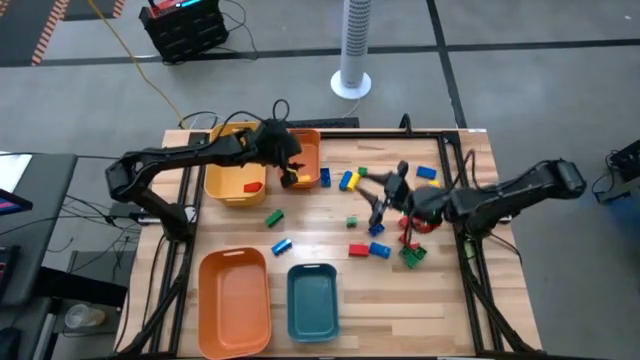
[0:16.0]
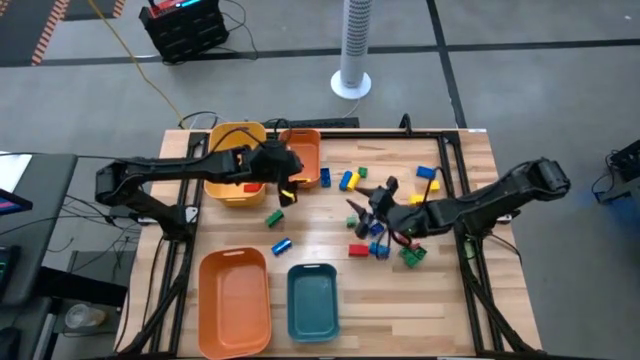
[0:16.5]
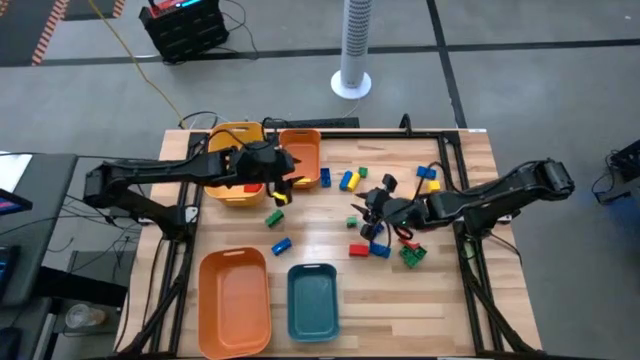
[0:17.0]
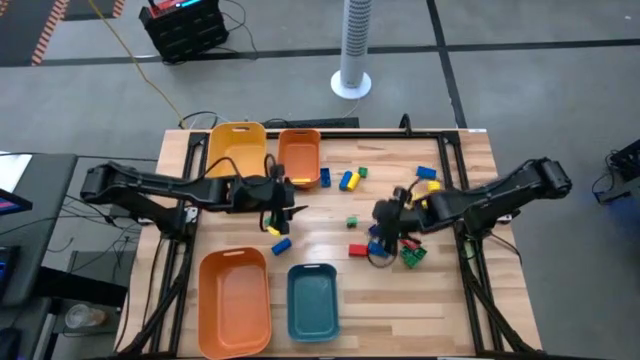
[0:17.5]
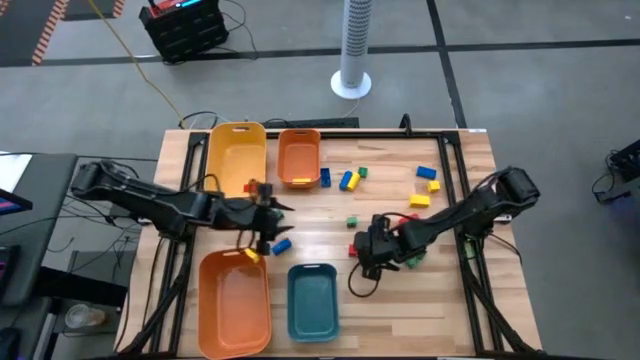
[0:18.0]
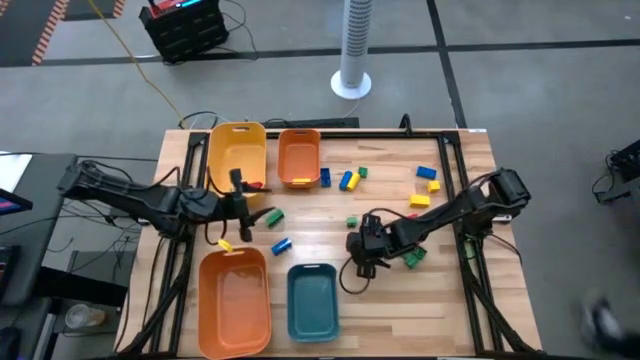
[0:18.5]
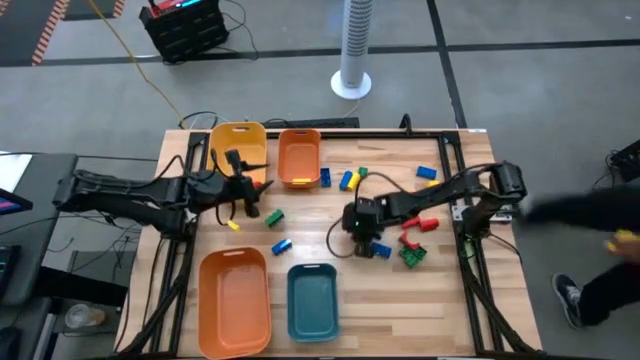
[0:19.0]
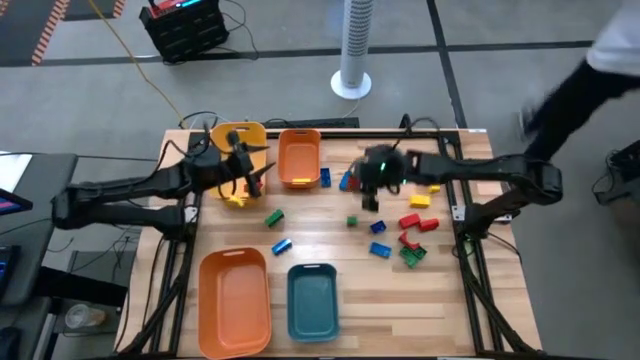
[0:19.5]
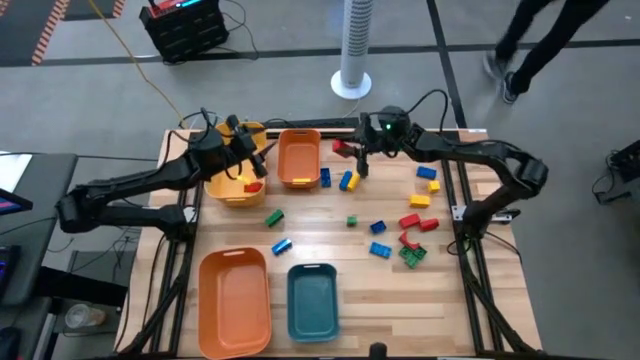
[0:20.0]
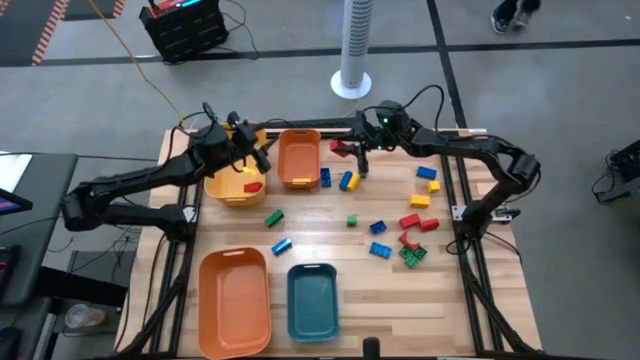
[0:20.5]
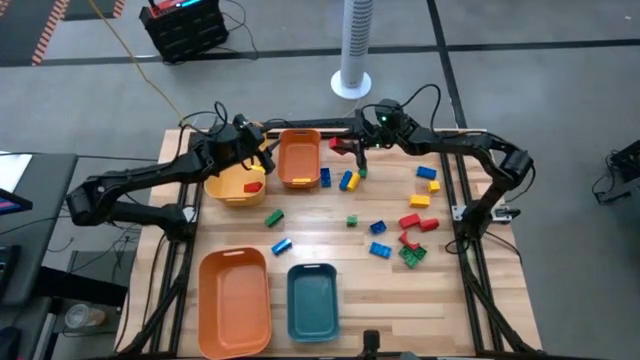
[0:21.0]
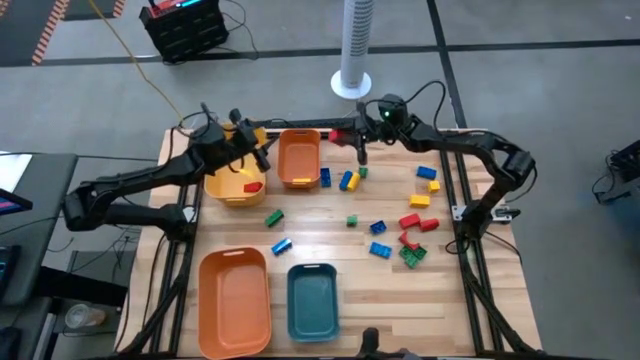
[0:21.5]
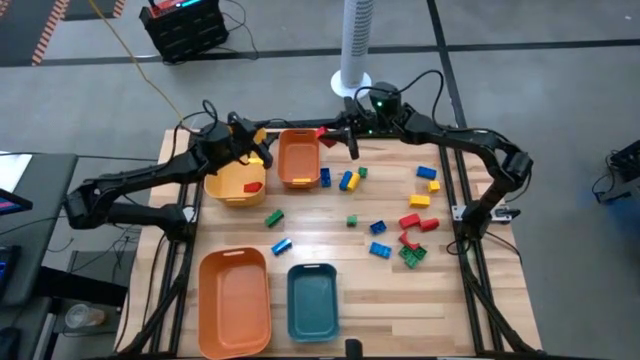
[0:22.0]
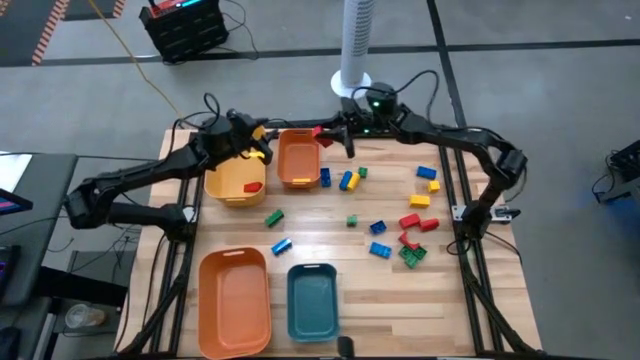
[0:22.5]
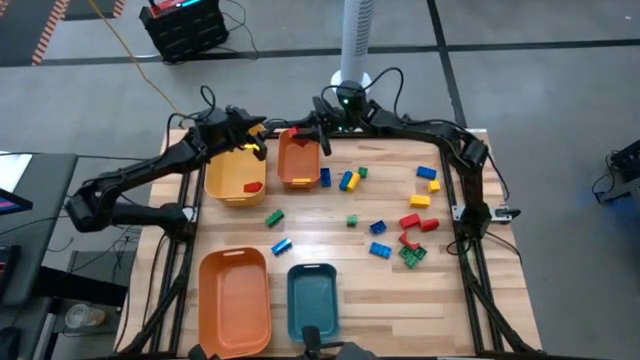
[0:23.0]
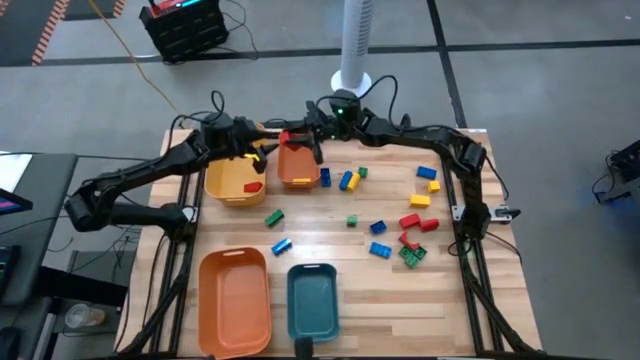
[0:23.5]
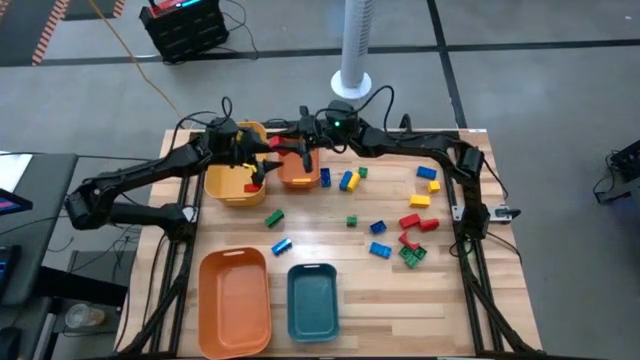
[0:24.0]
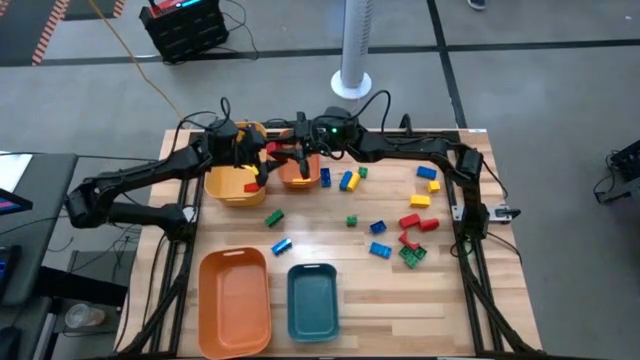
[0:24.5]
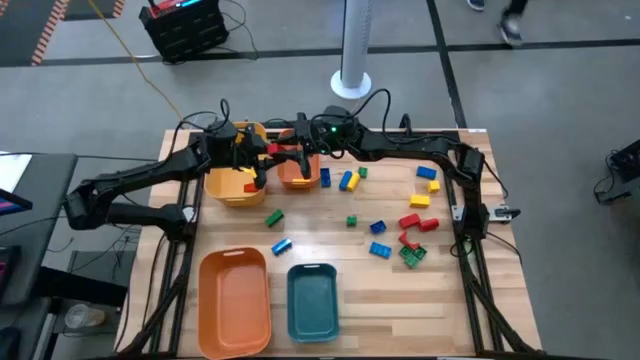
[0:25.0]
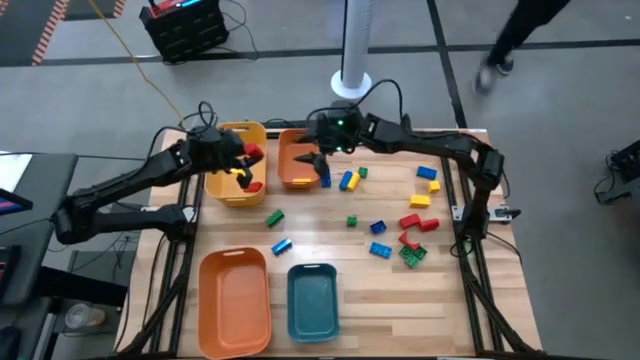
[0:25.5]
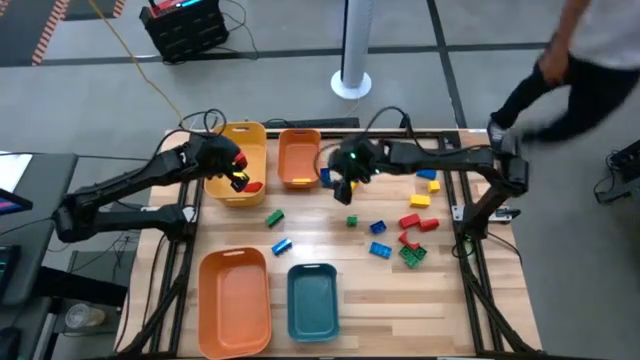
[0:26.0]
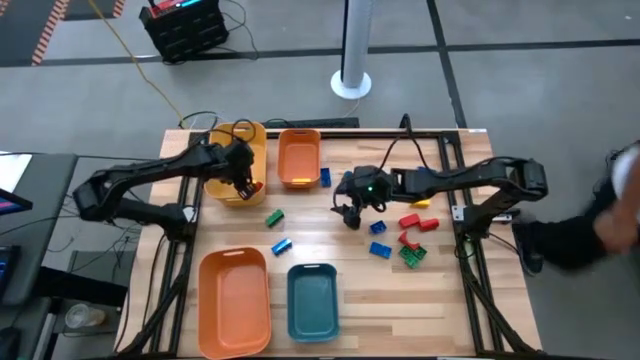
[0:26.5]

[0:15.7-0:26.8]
Task: Sort blocks
Put the red block into the yellow bin

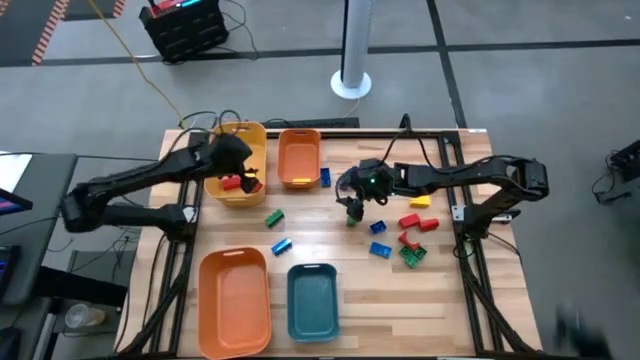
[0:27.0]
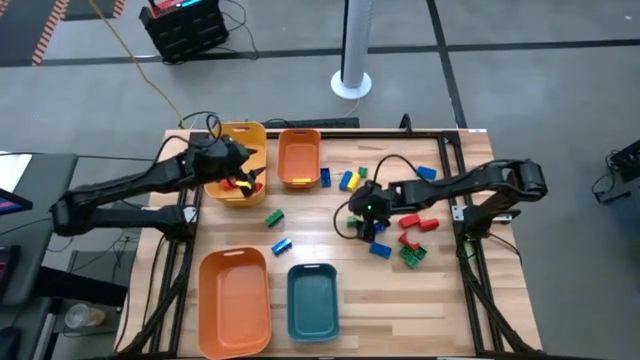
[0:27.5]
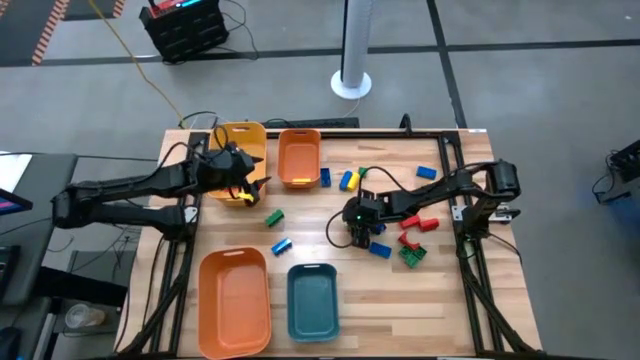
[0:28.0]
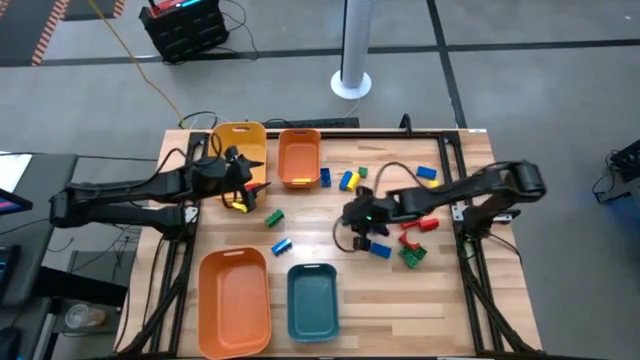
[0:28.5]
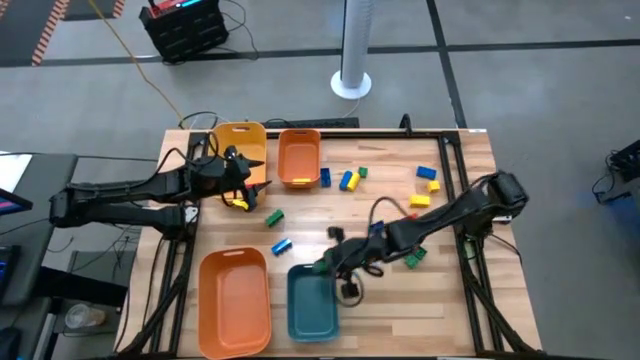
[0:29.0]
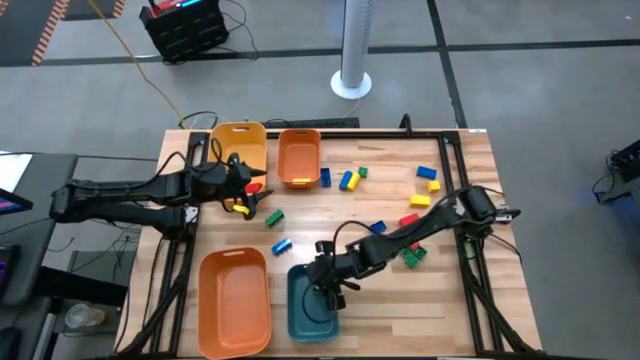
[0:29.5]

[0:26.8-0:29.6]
Put the green game piece into the blue bin

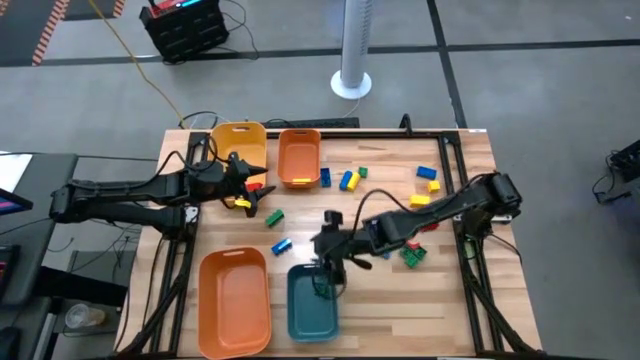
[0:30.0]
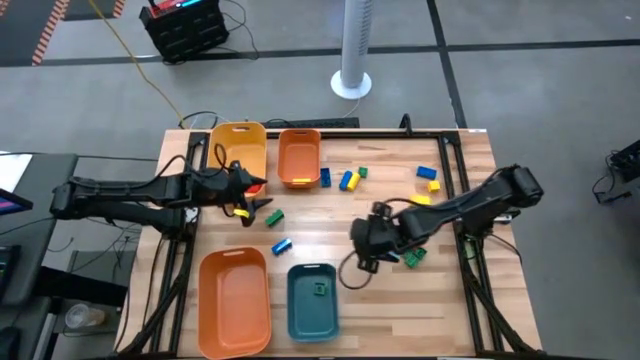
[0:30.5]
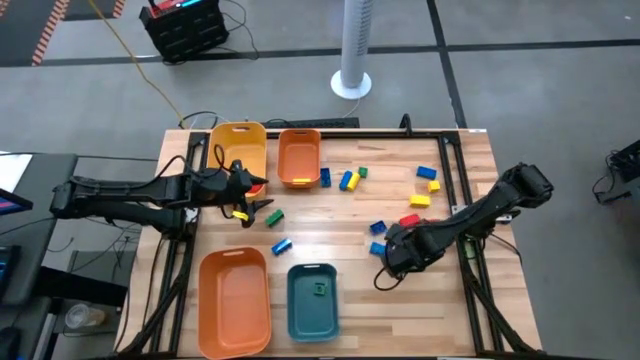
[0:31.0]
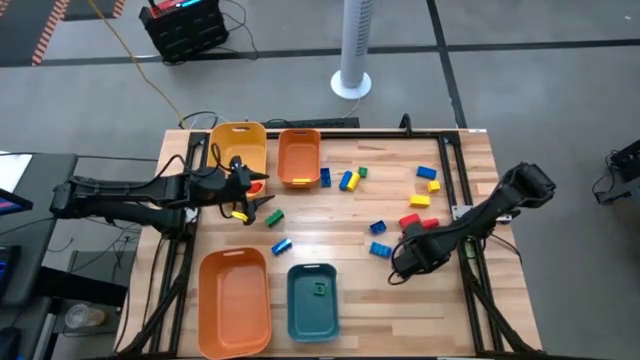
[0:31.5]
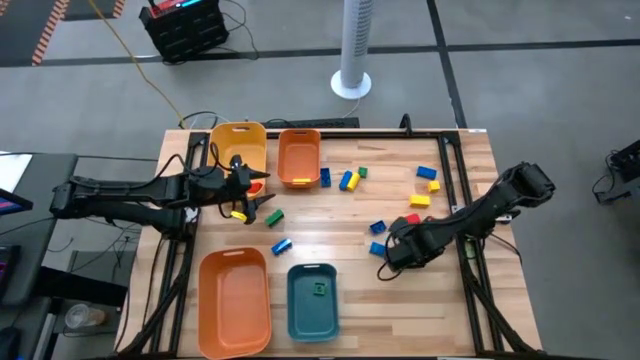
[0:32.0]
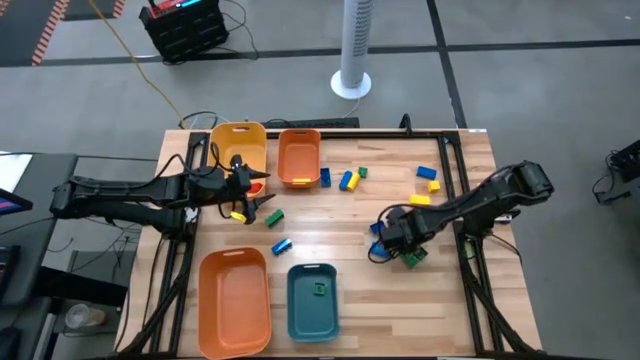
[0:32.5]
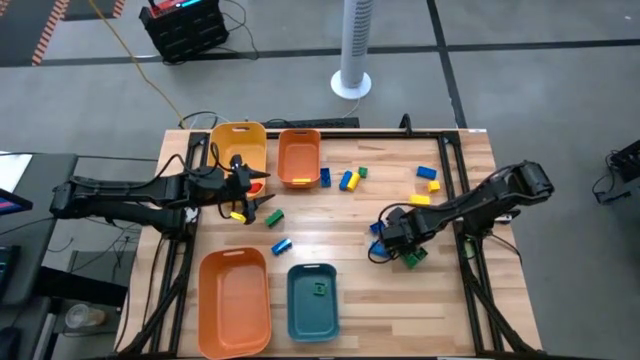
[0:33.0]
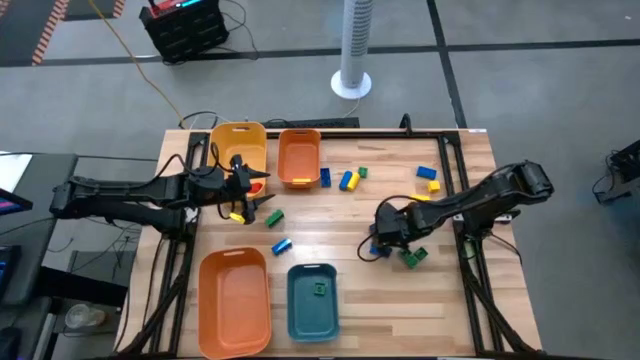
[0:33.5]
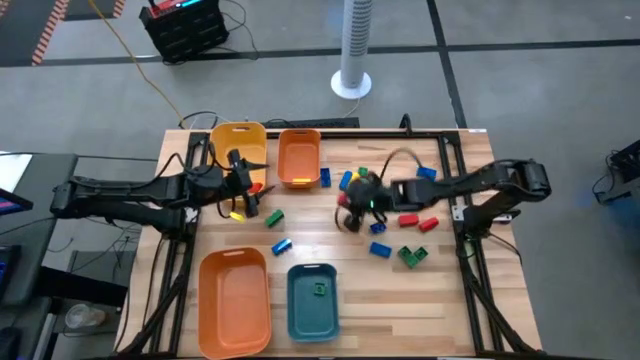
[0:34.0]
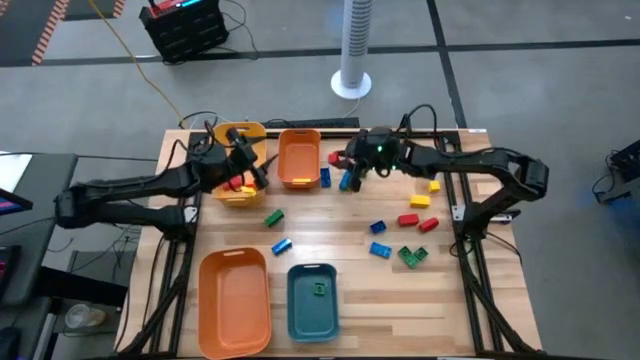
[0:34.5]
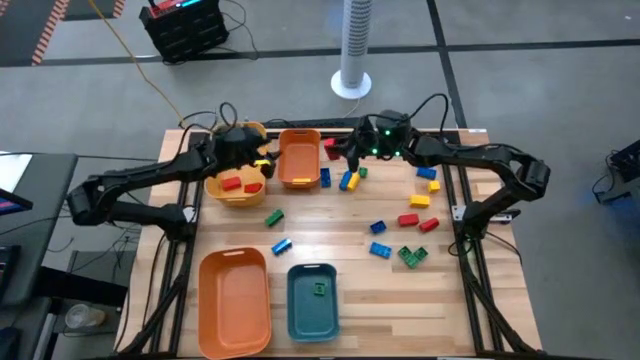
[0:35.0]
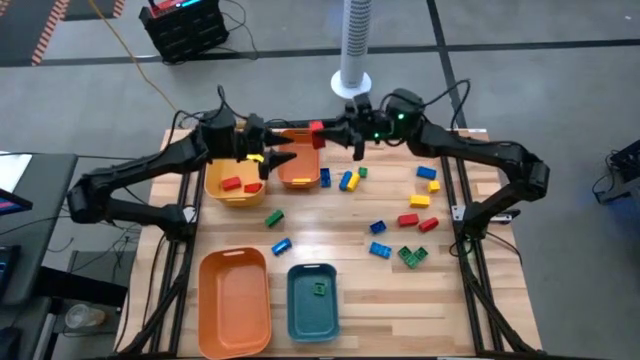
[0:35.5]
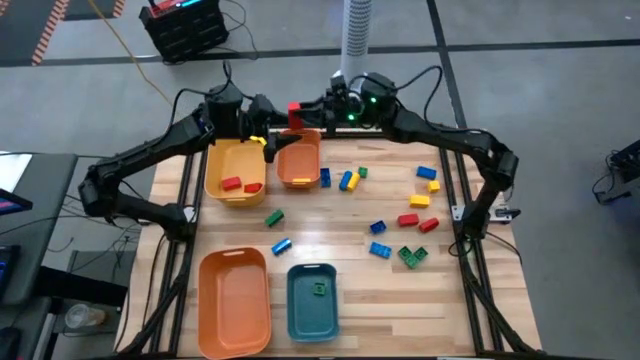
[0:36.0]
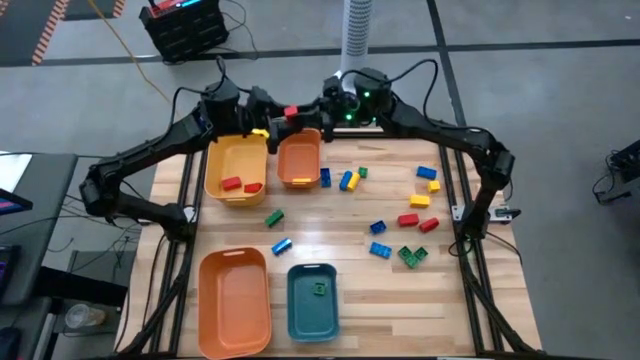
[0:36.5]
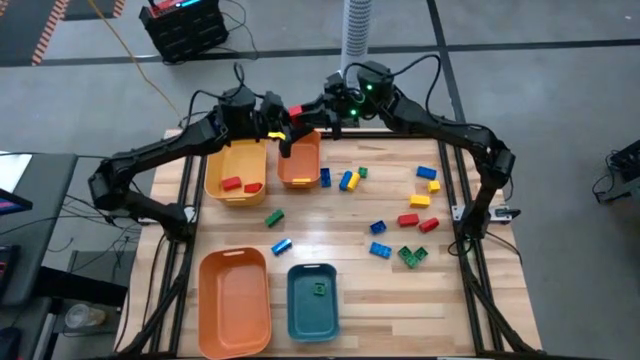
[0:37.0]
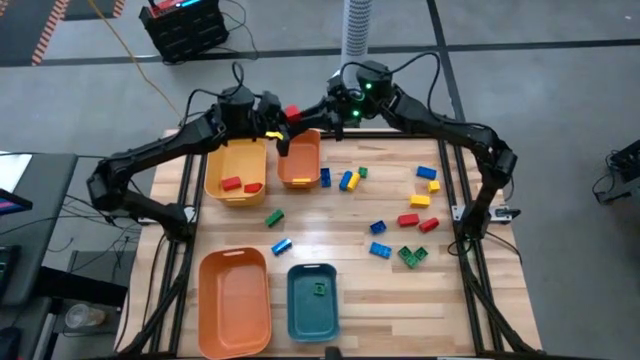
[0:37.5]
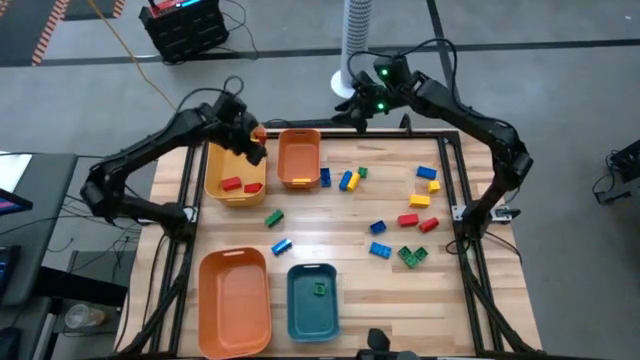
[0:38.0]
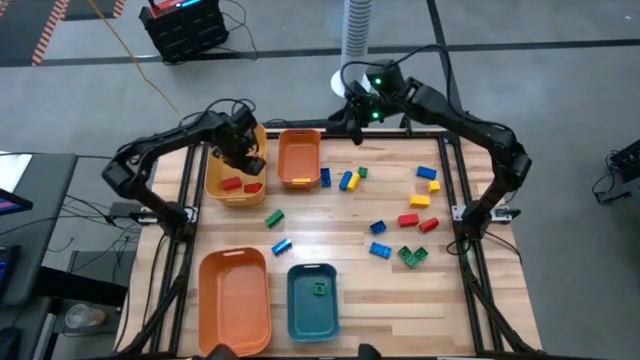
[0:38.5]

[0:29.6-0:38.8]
Put the red wooden block into the yellow bin
